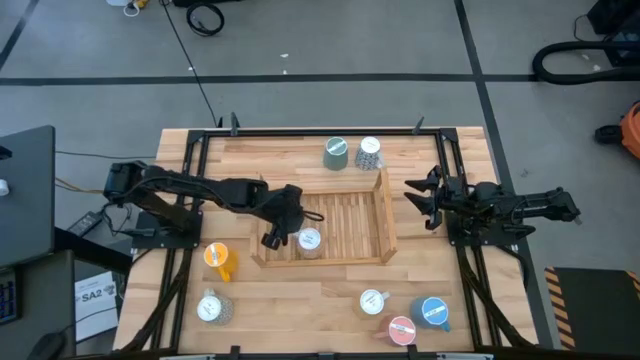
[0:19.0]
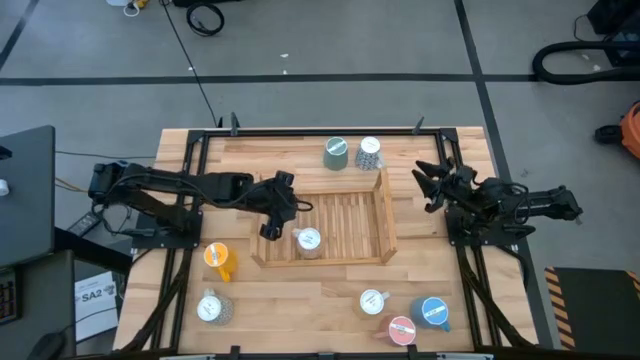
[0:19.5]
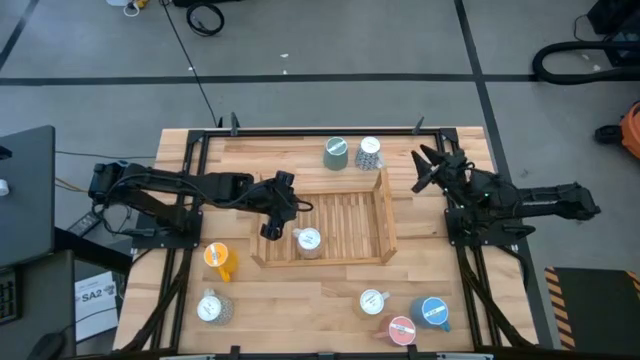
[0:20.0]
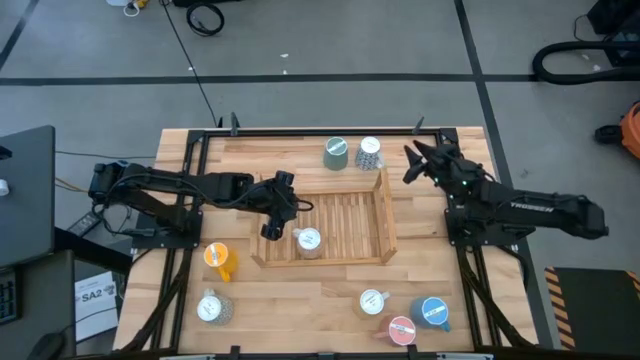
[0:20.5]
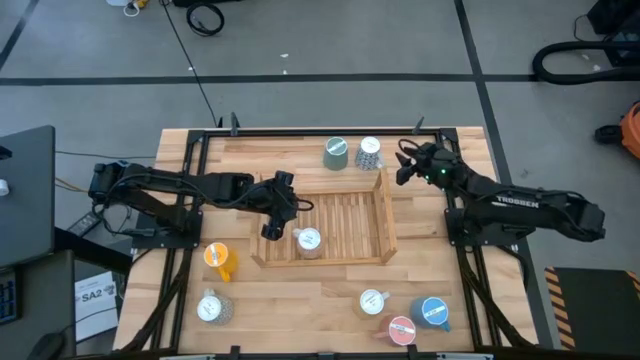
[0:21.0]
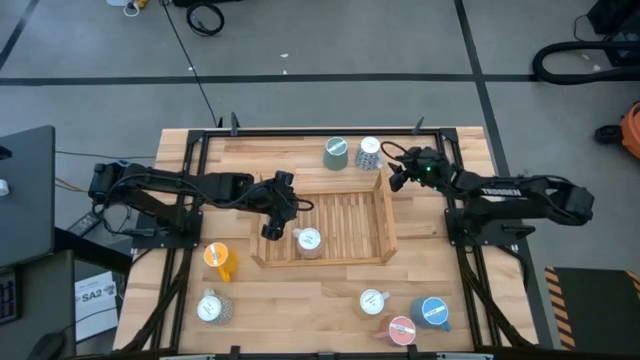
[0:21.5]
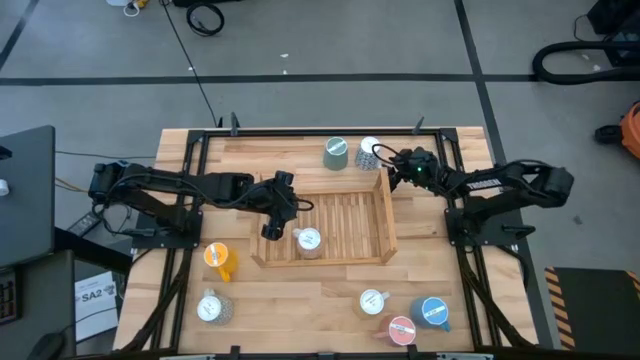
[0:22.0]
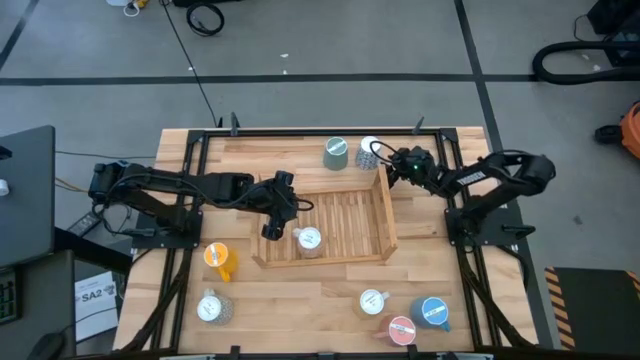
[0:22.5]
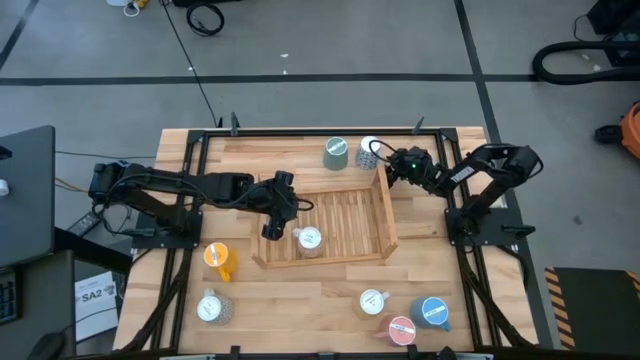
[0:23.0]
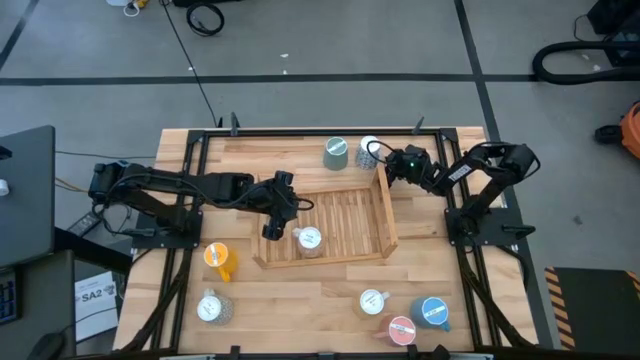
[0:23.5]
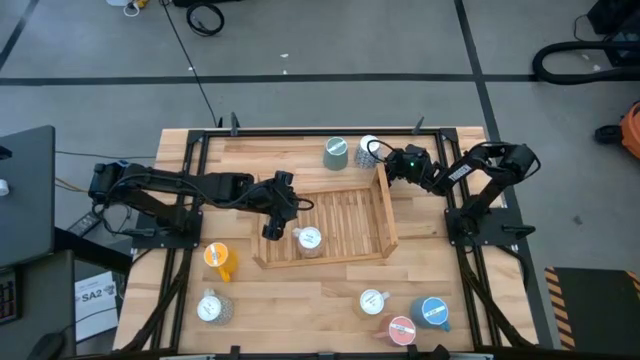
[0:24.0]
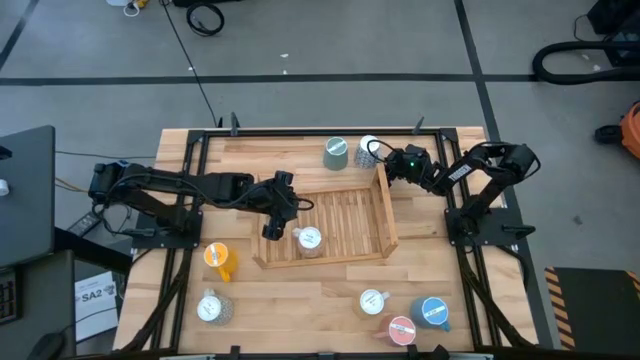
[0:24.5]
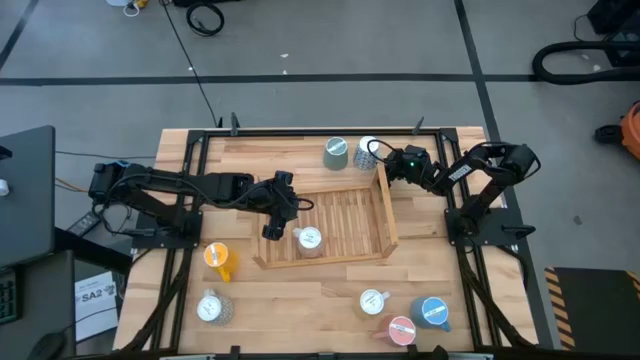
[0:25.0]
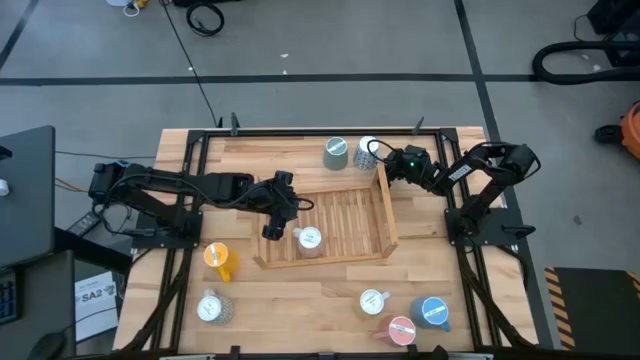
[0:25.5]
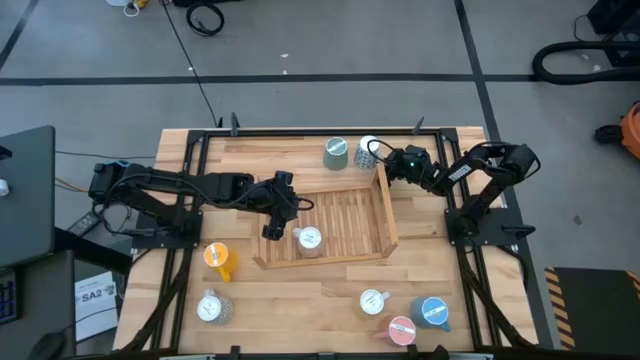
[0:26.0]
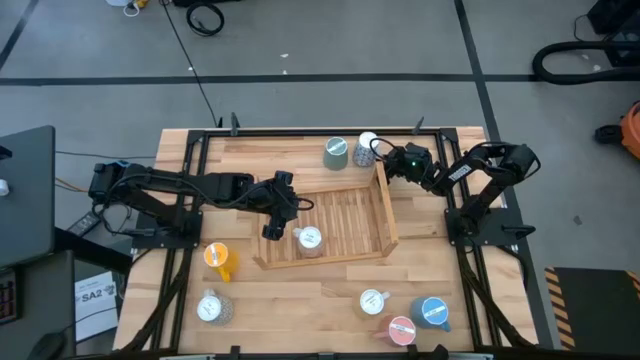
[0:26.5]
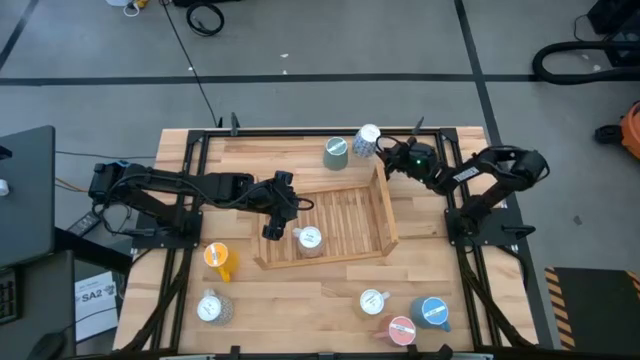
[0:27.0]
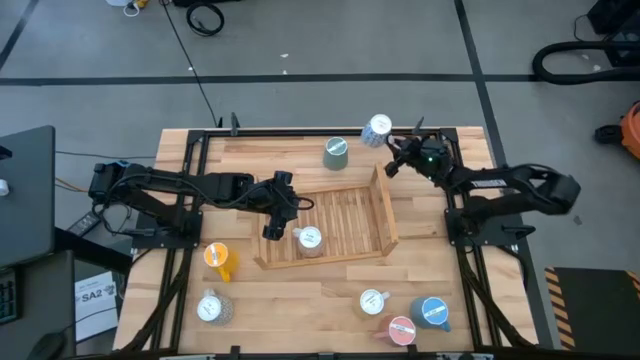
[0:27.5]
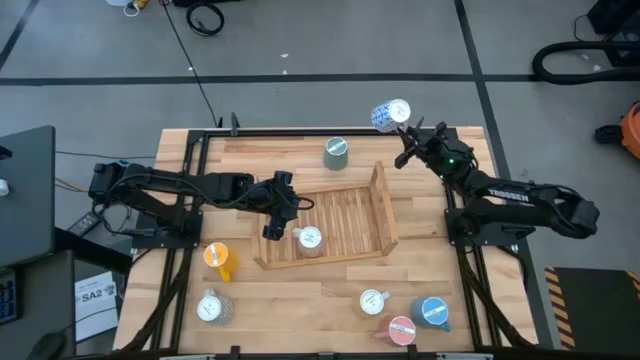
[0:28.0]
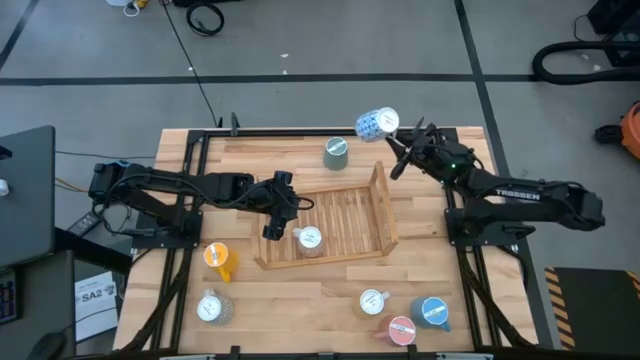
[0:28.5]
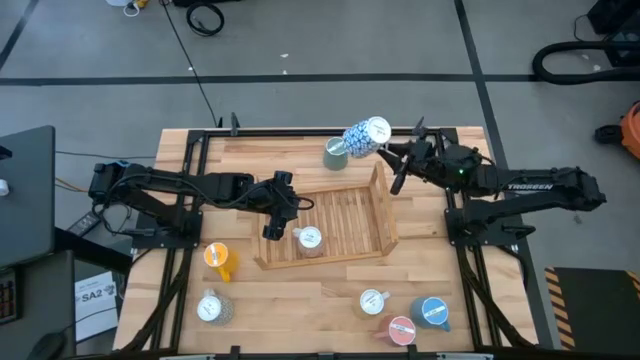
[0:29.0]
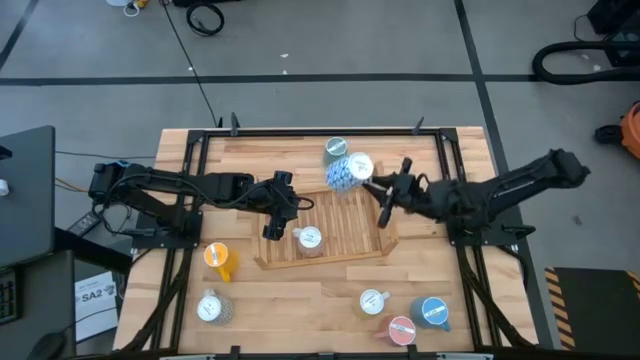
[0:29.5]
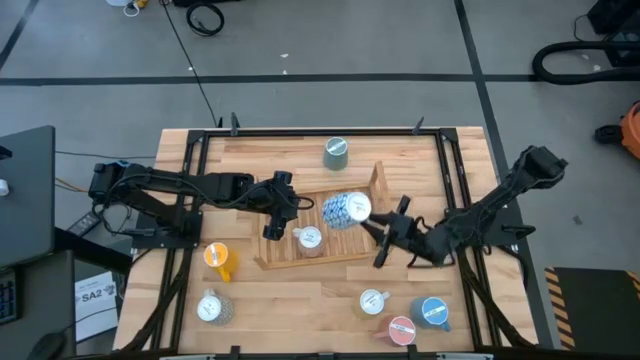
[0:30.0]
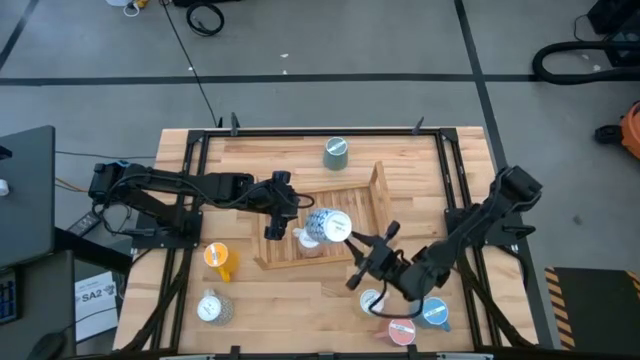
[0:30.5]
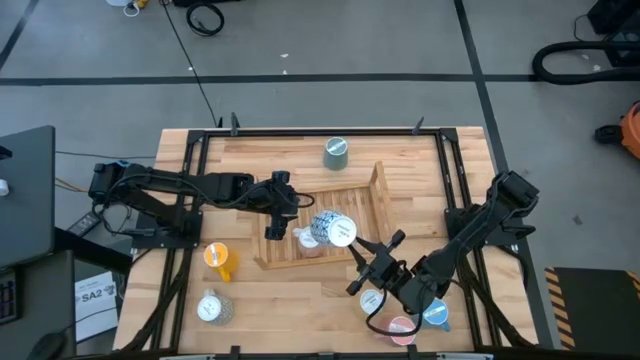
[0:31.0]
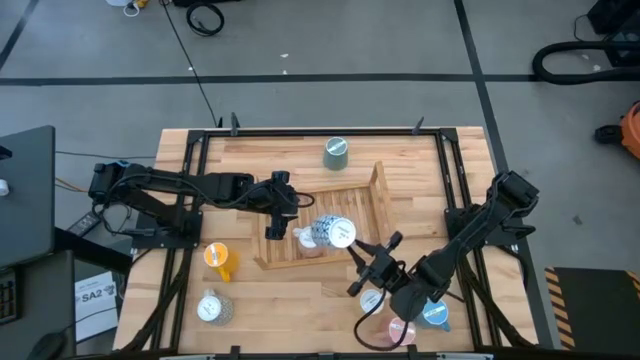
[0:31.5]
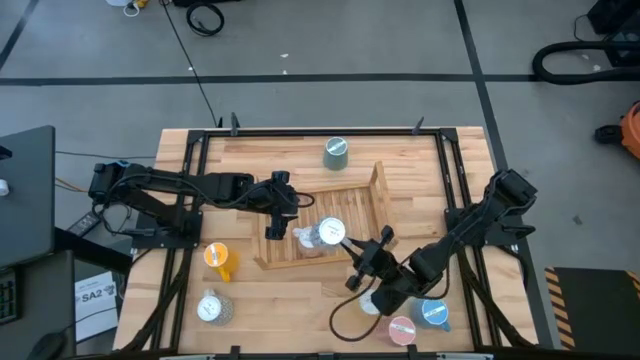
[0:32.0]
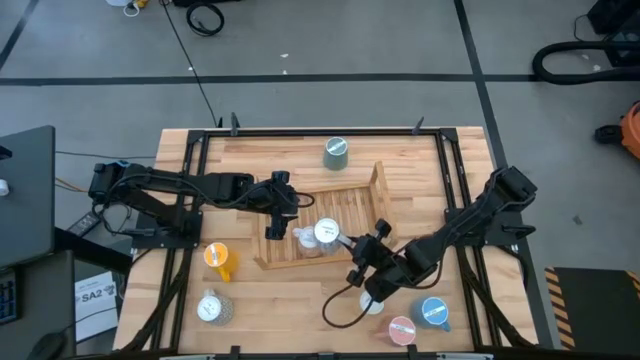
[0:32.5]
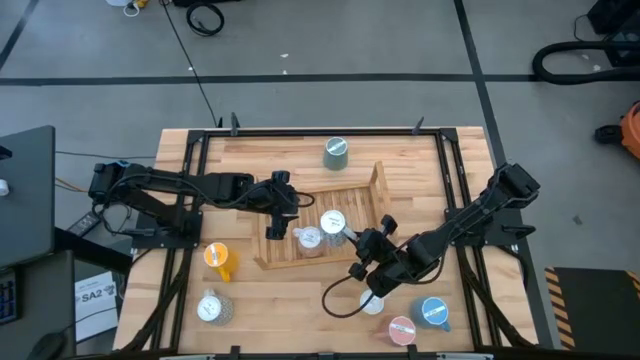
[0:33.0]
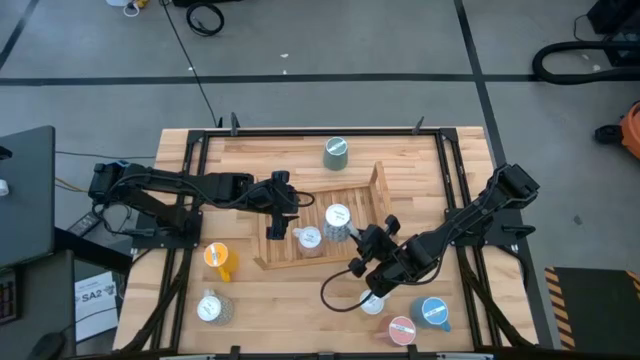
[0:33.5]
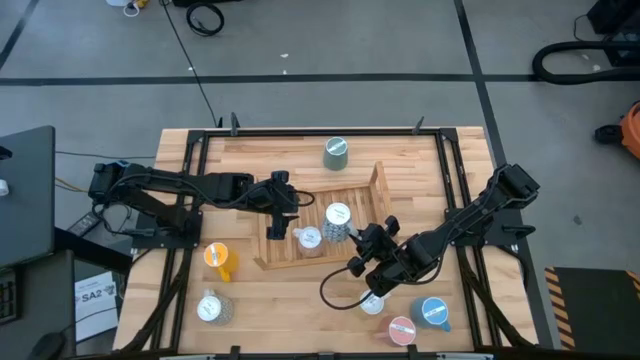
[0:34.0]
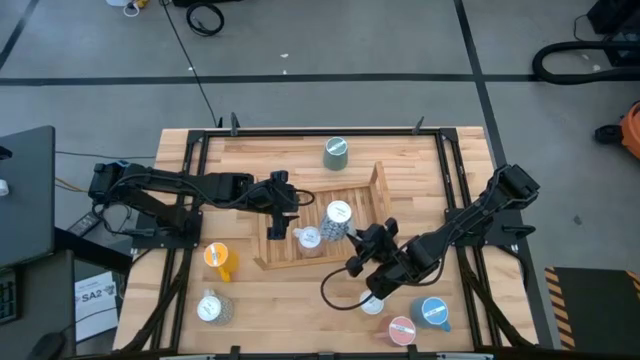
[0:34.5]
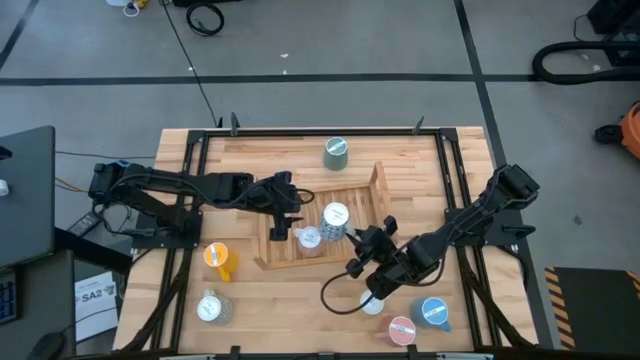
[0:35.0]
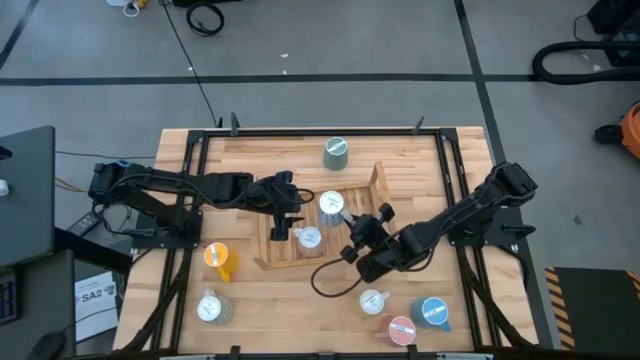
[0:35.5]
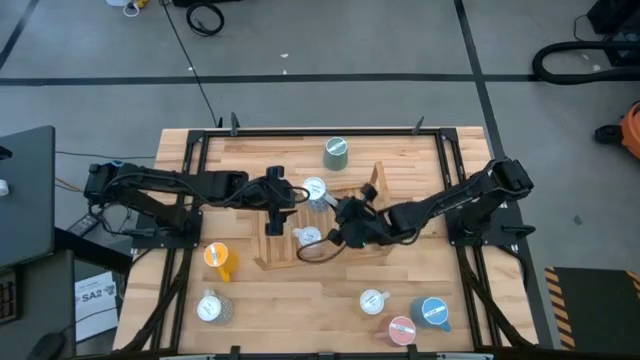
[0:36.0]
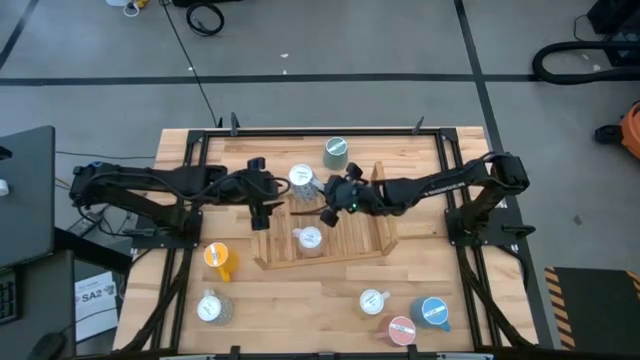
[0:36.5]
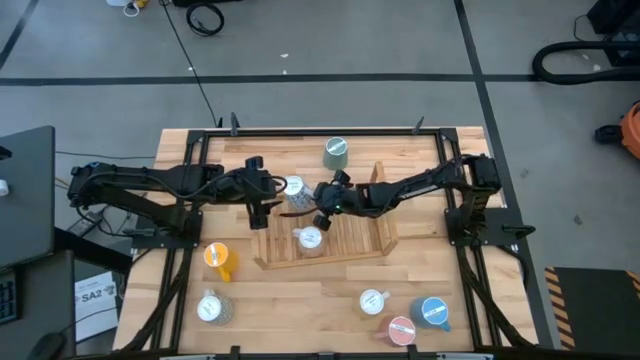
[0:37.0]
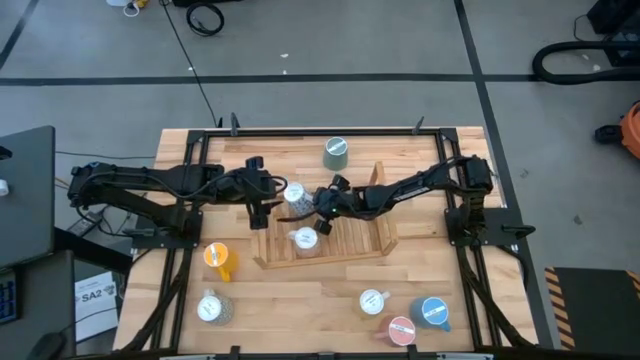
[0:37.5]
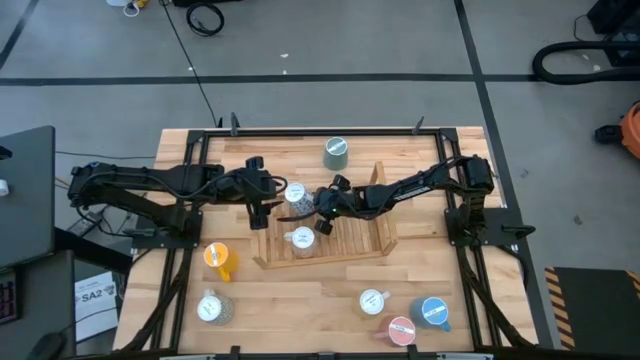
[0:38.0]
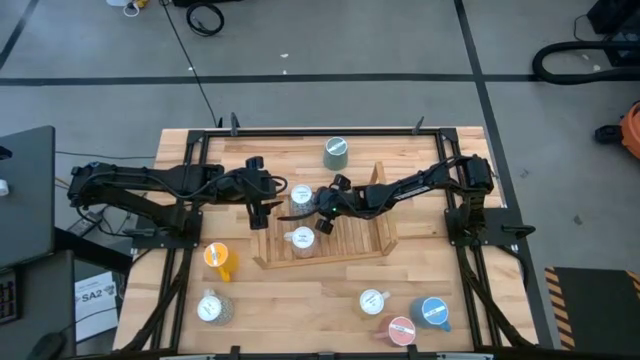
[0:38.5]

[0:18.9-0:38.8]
Task: Place coffee mugs
Put the blue patterned mug on the shelf

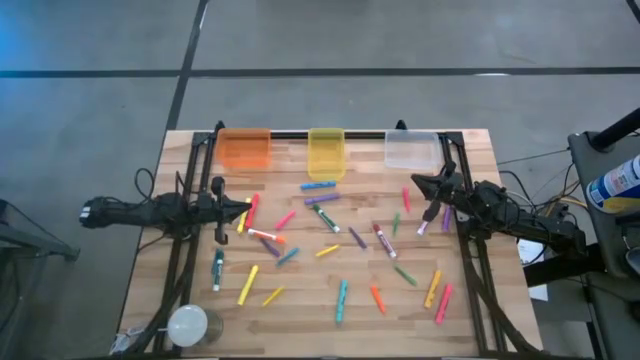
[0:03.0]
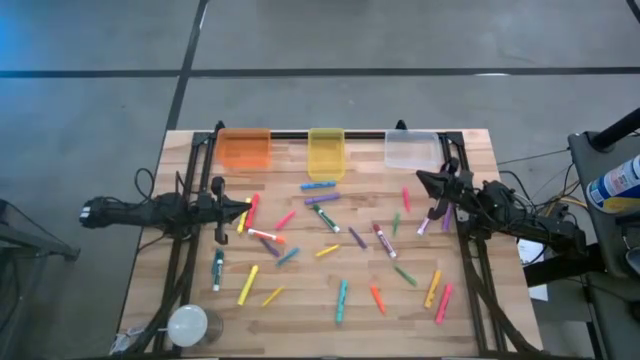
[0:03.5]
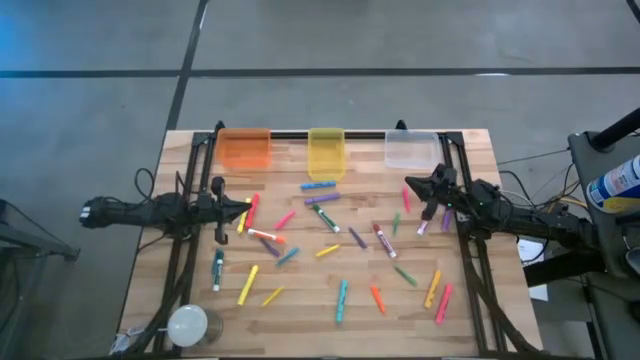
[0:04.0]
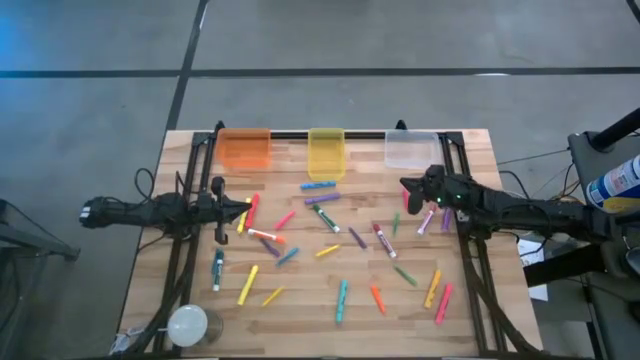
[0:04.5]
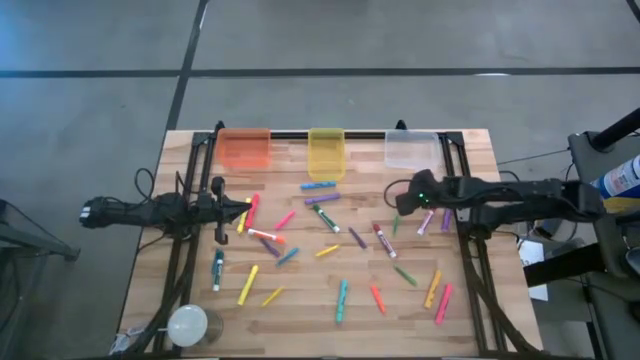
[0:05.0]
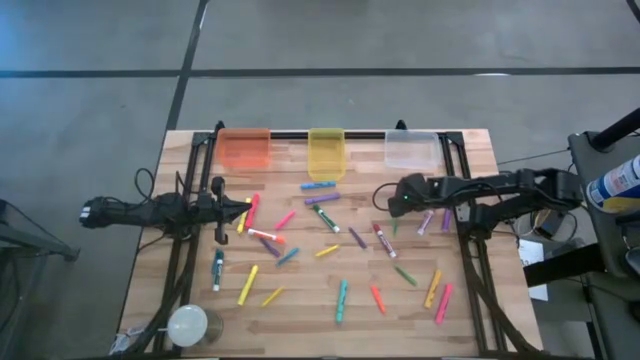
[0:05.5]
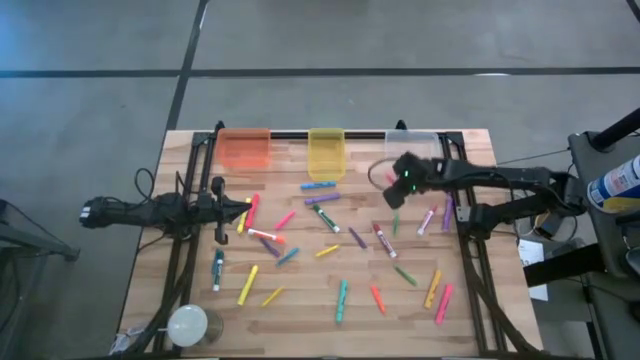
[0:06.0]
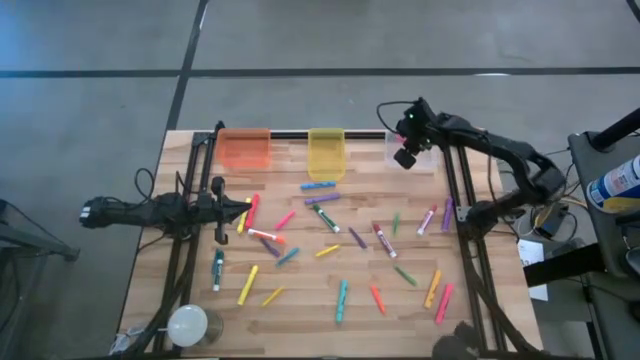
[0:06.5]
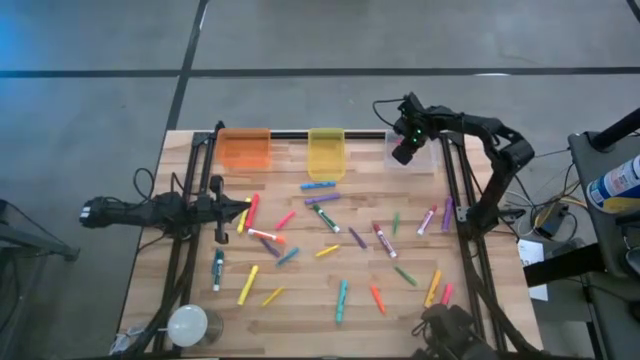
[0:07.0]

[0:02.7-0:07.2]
Task: Pick & Place Markers
Put the right pink pen into the transparent bin
